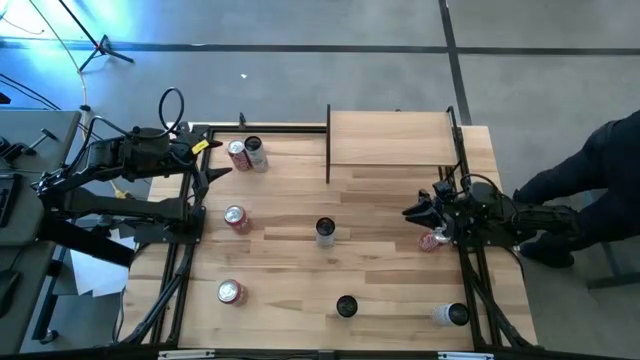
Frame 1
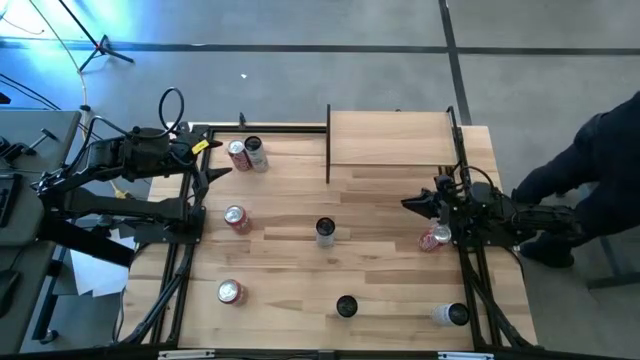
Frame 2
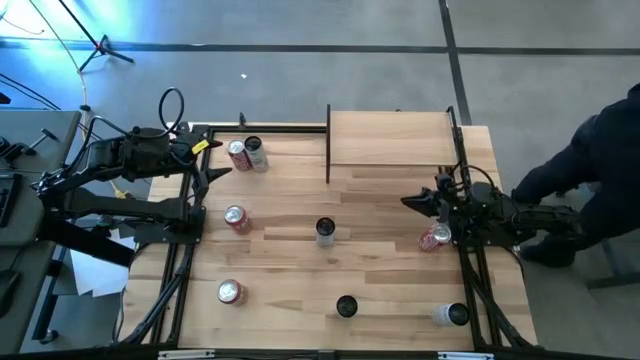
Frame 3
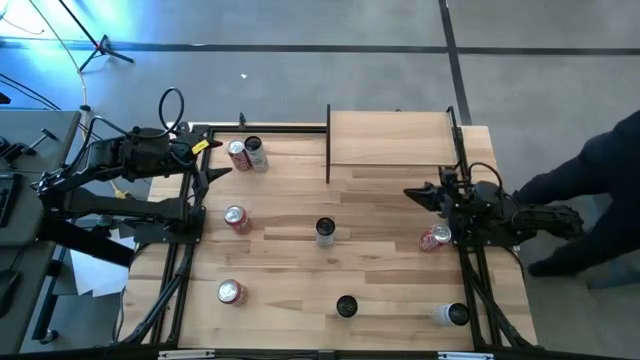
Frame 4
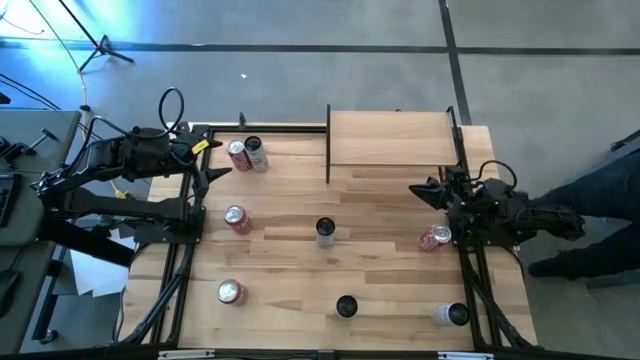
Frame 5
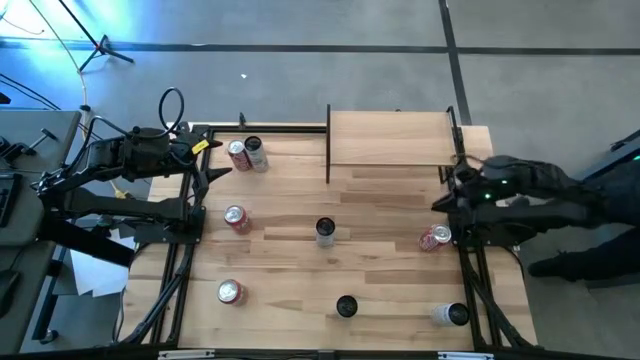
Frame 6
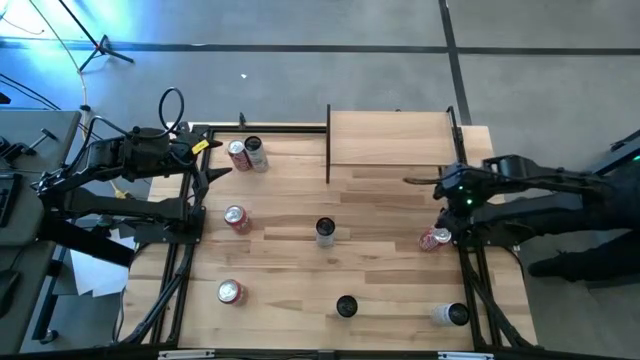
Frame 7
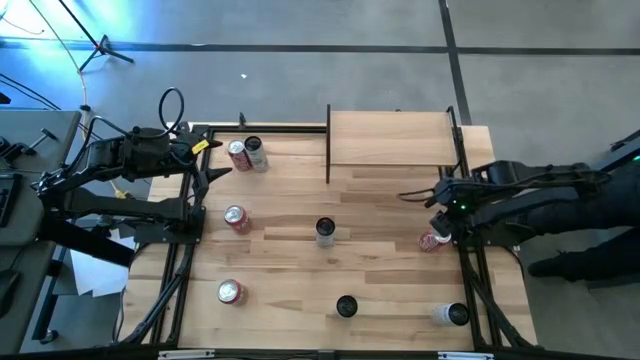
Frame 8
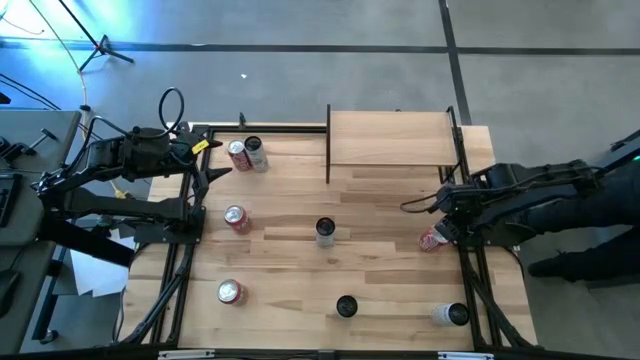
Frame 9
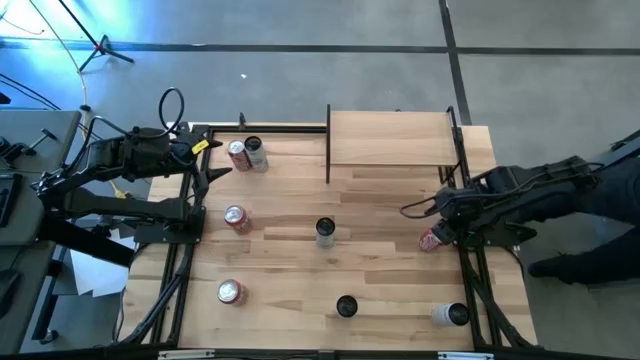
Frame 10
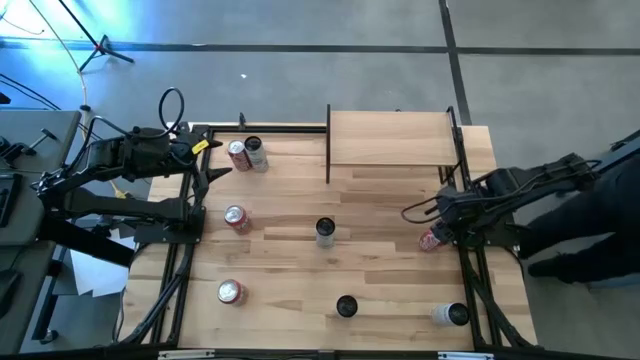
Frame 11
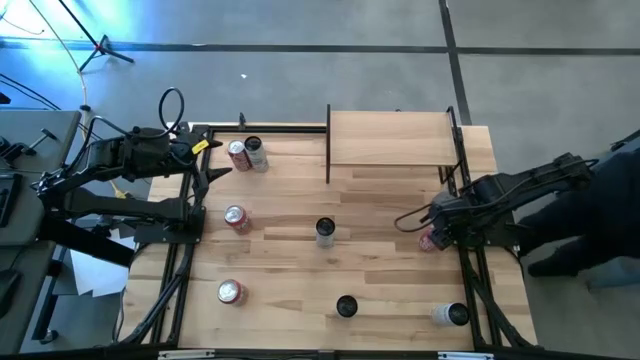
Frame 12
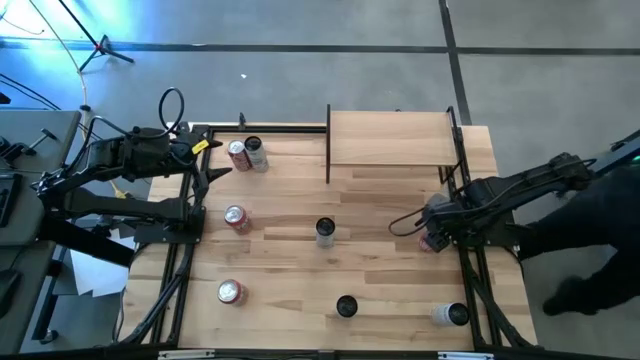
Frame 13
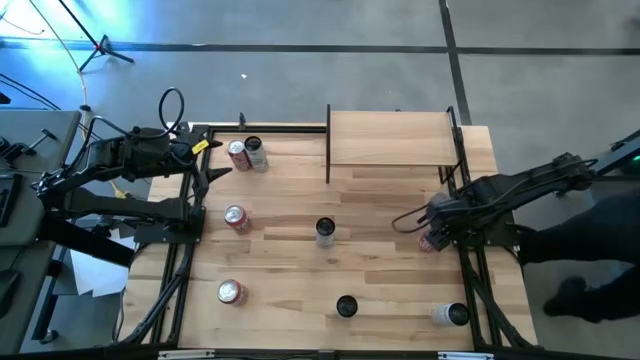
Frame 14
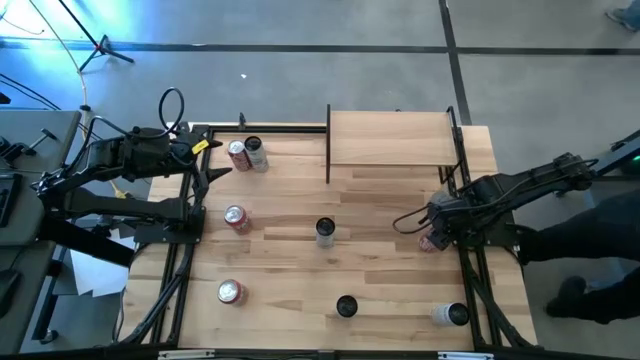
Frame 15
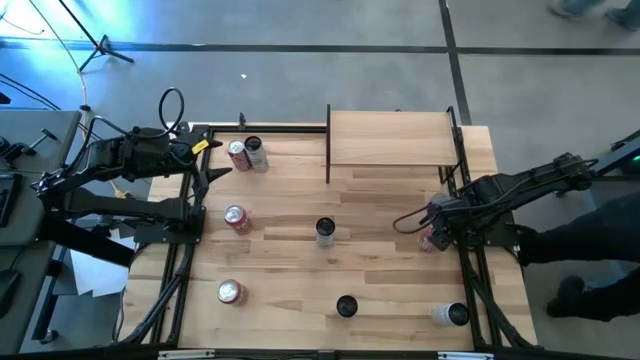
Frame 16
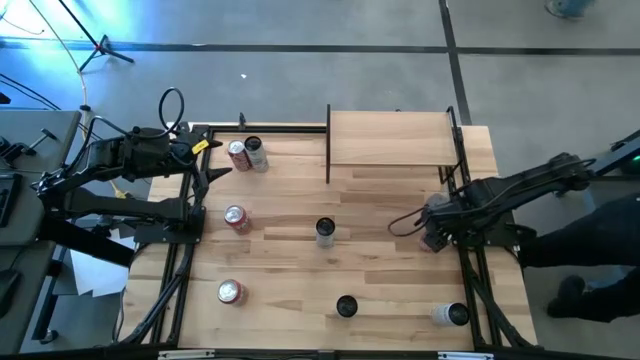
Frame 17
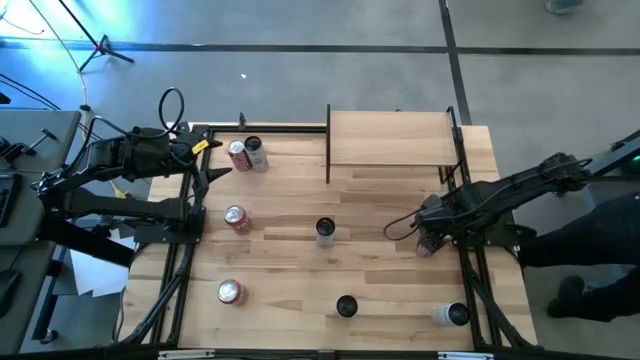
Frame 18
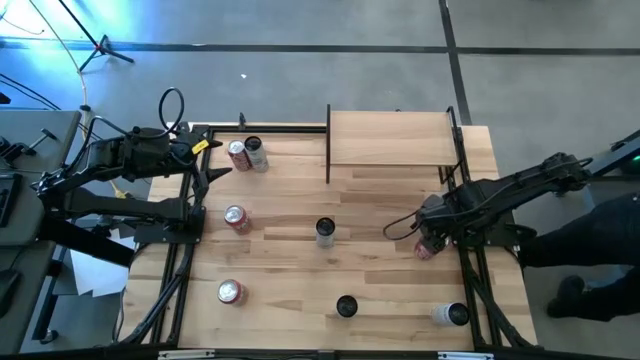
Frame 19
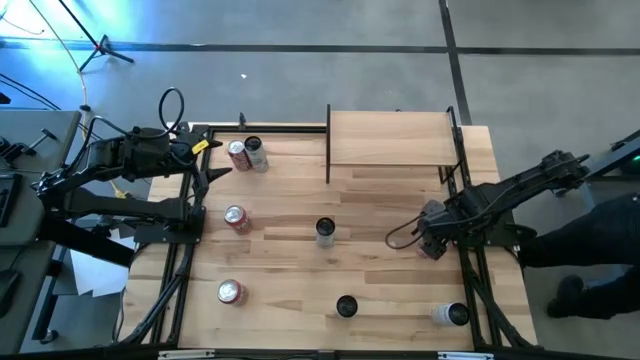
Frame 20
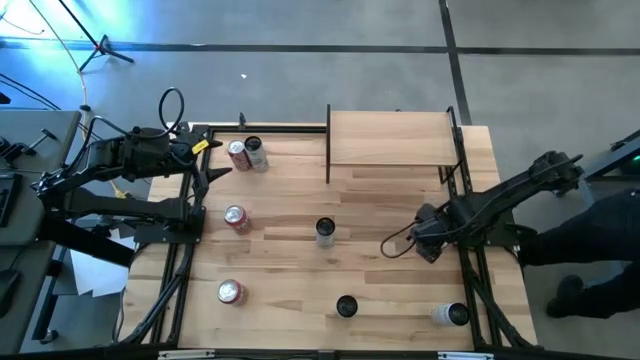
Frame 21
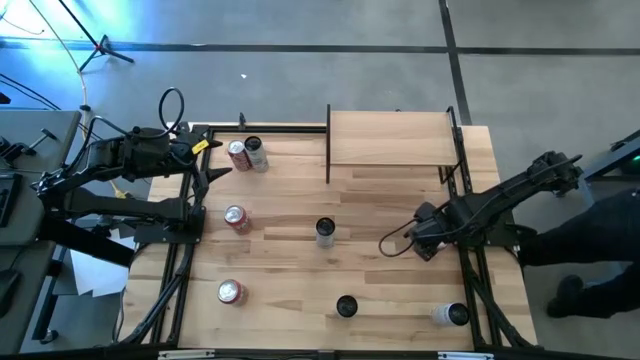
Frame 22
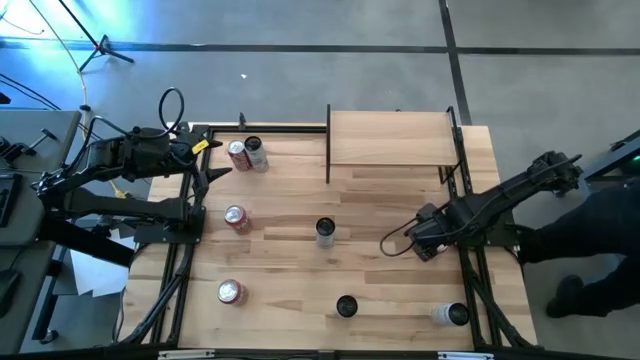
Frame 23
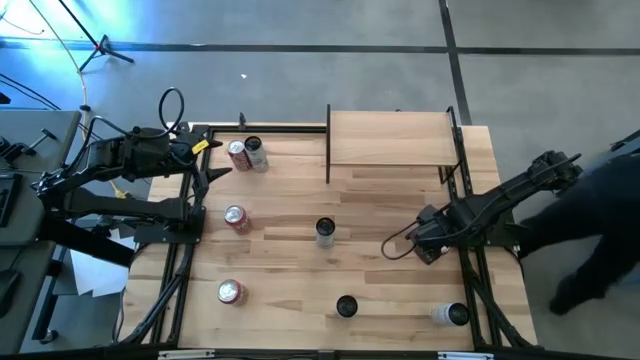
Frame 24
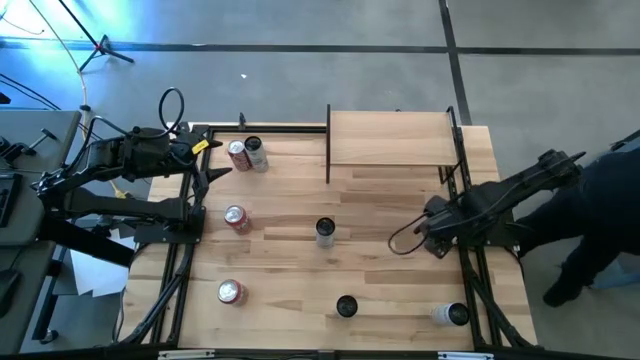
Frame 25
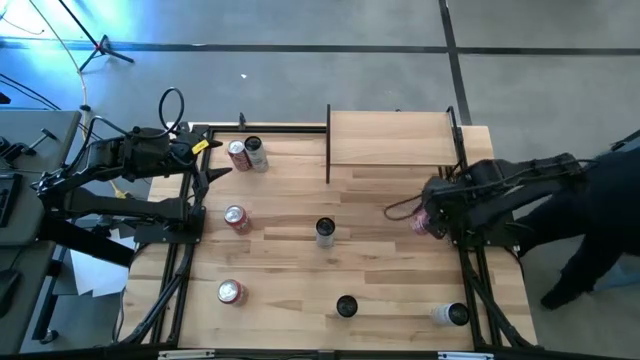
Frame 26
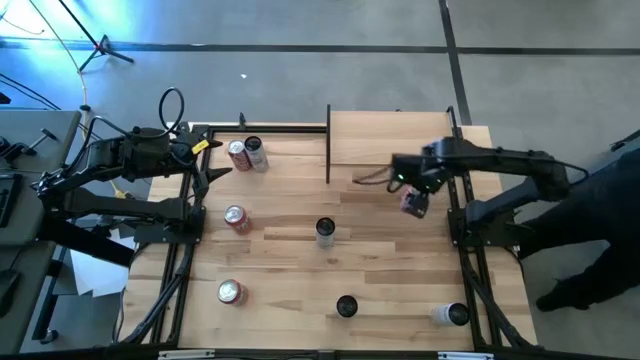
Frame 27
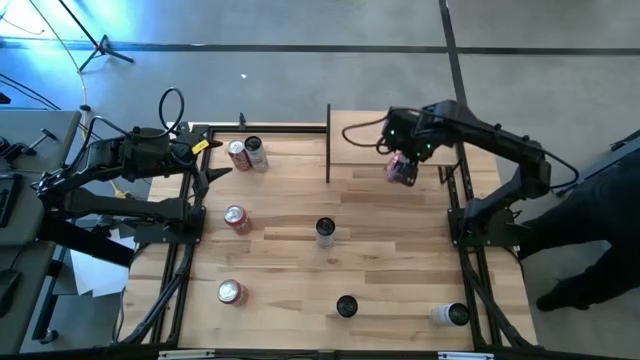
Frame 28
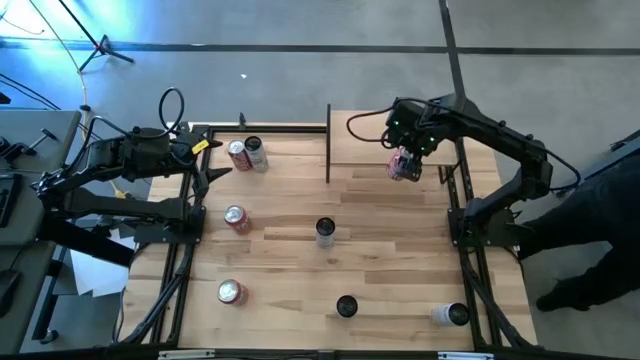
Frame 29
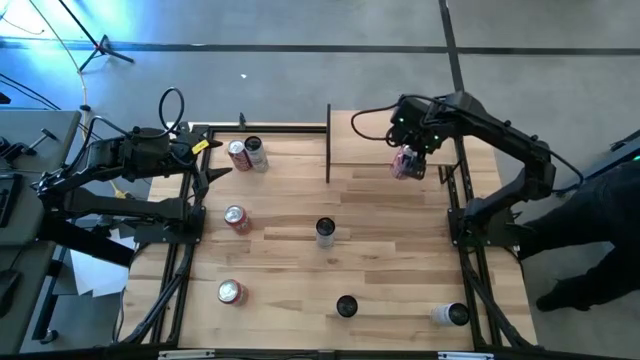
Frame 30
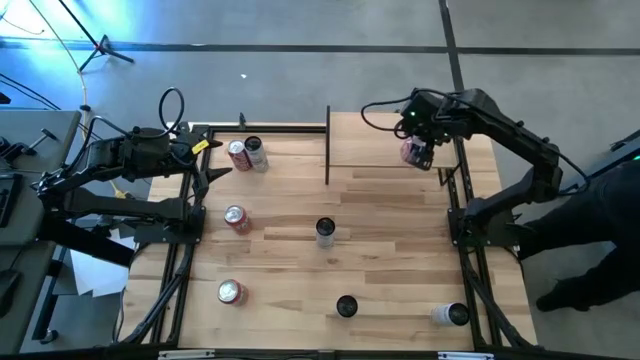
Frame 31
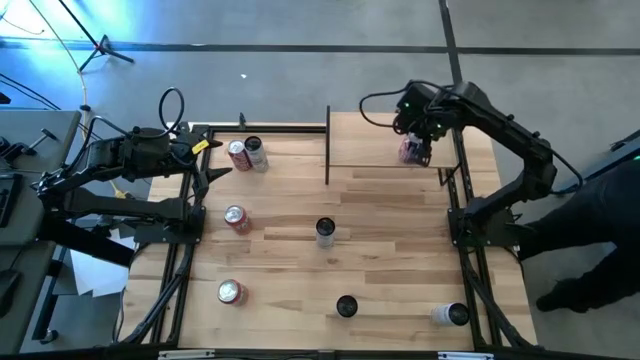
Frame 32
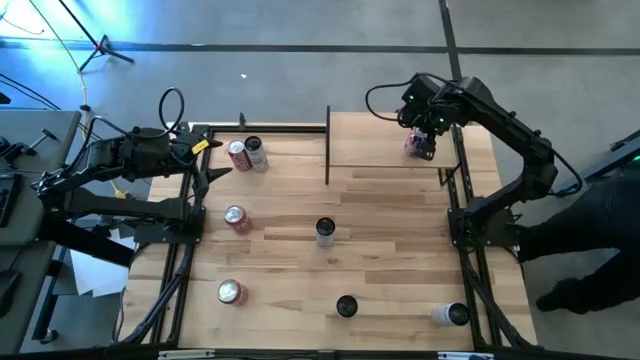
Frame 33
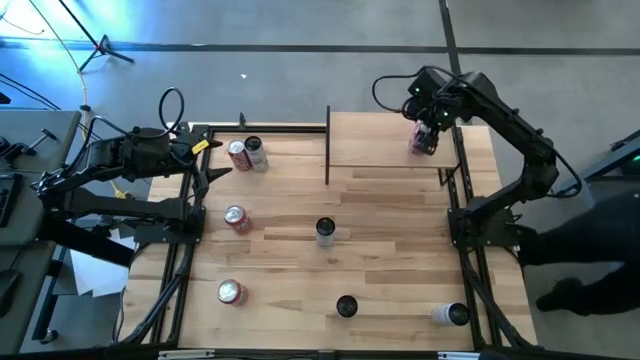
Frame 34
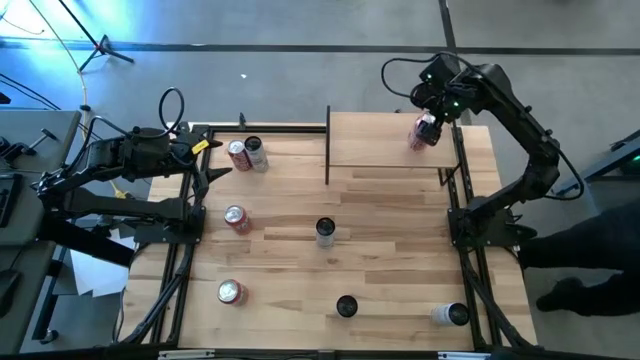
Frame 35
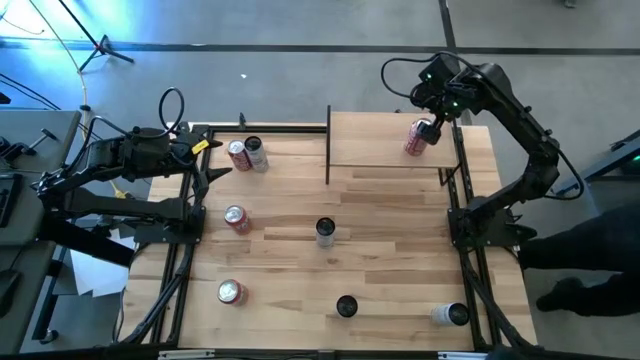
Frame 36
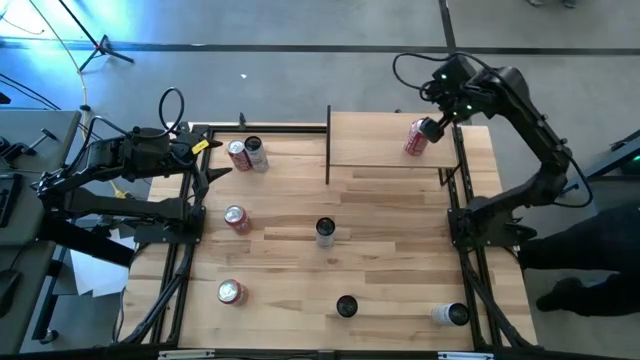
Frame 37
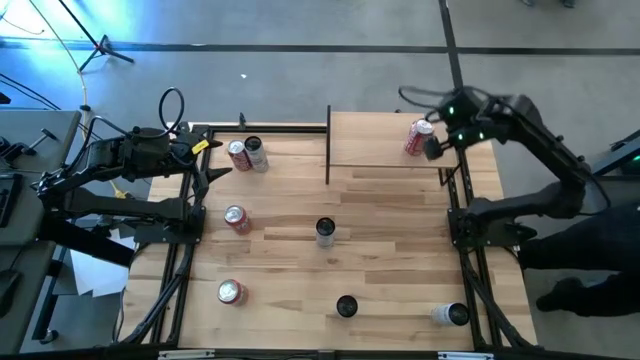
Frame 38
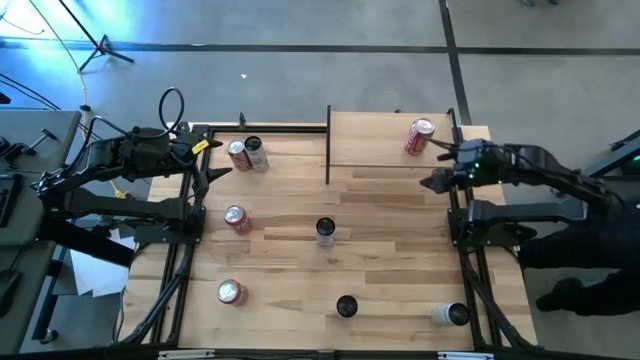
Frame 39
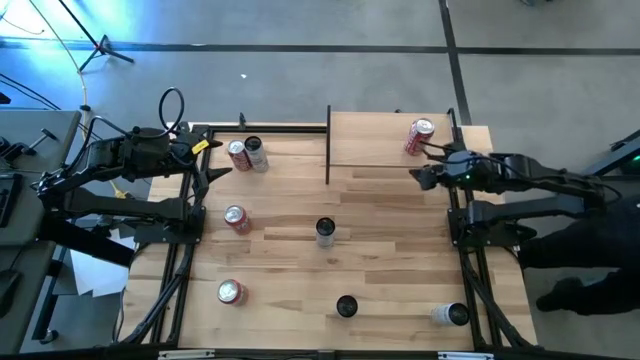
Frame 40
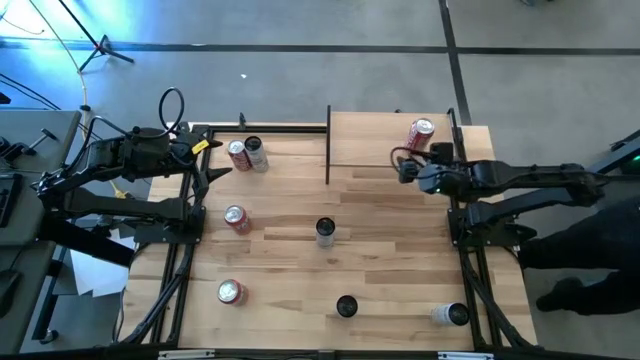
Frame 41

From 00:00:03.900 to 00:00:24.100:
Task: Place canned beverage on shelf
Put the red soda can on the shelf
